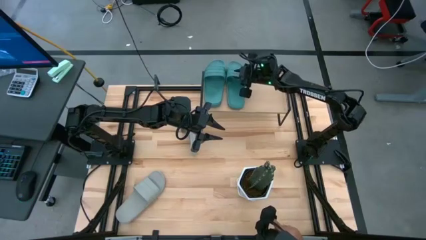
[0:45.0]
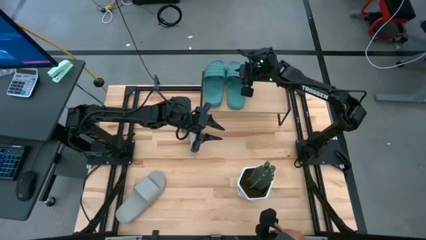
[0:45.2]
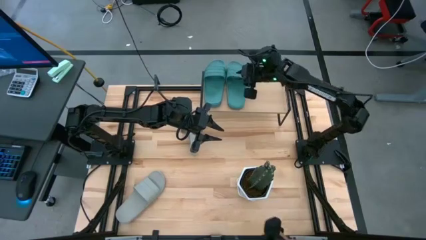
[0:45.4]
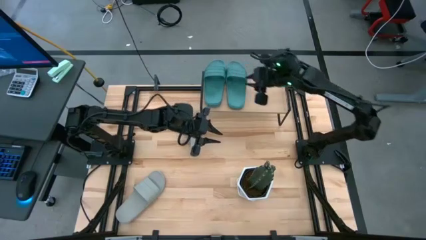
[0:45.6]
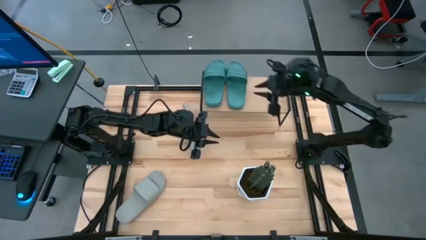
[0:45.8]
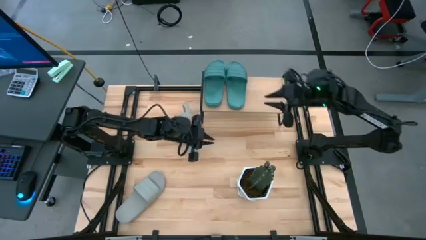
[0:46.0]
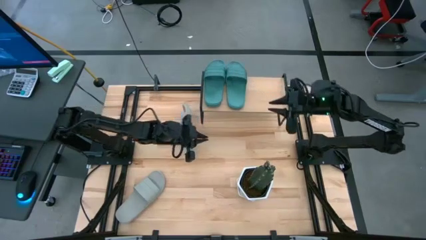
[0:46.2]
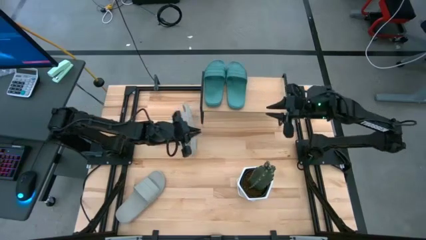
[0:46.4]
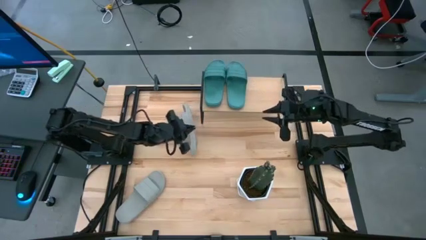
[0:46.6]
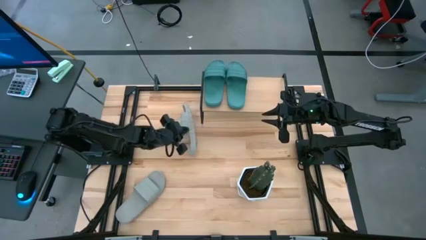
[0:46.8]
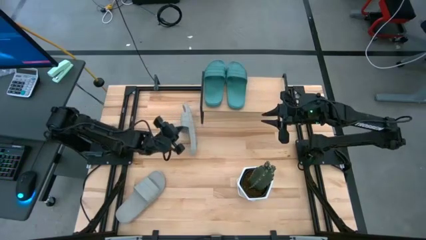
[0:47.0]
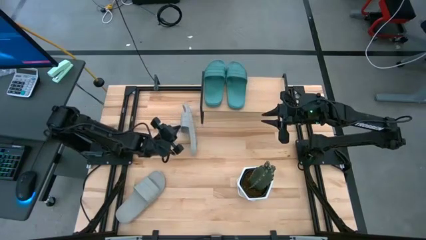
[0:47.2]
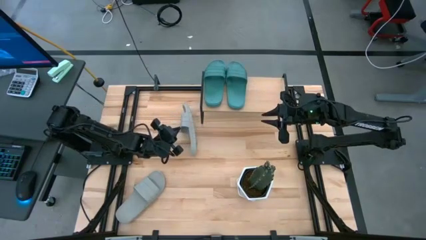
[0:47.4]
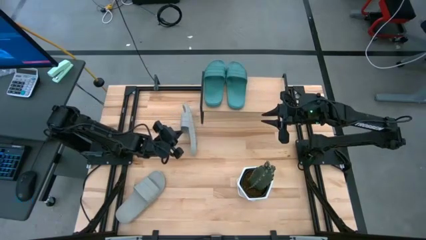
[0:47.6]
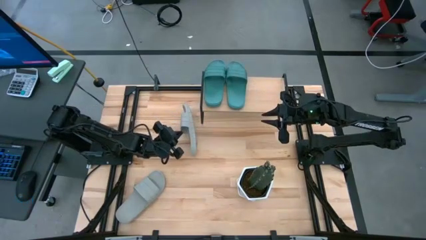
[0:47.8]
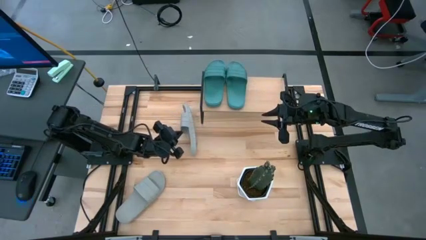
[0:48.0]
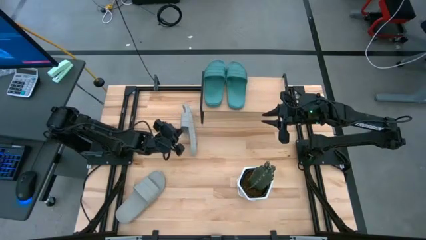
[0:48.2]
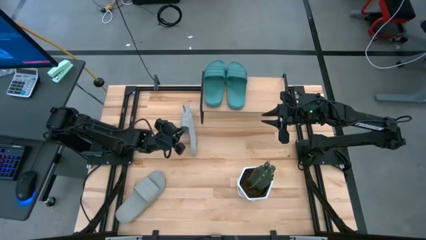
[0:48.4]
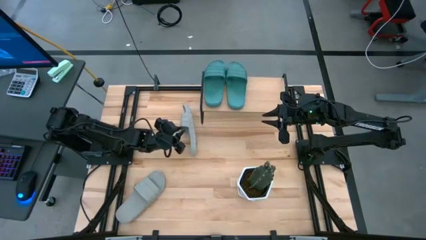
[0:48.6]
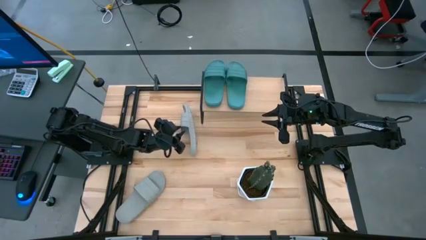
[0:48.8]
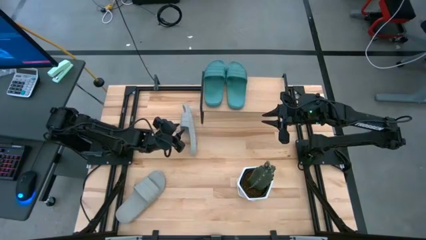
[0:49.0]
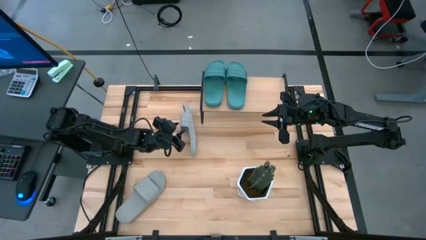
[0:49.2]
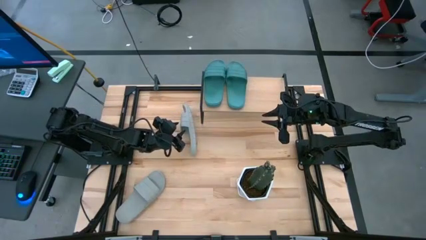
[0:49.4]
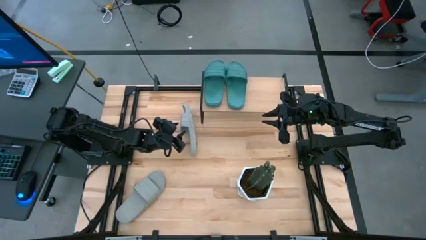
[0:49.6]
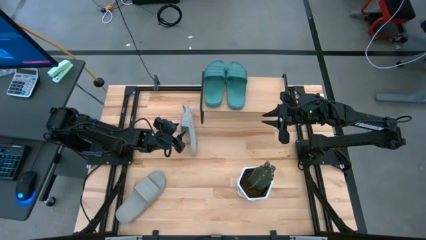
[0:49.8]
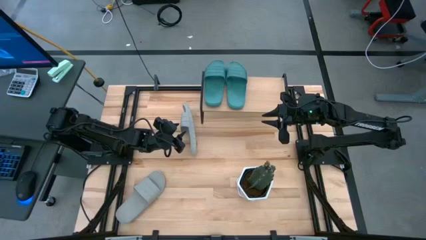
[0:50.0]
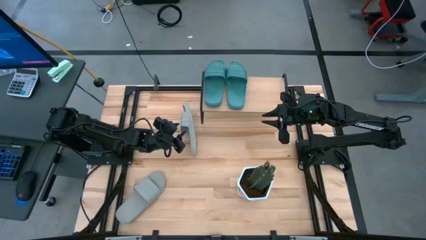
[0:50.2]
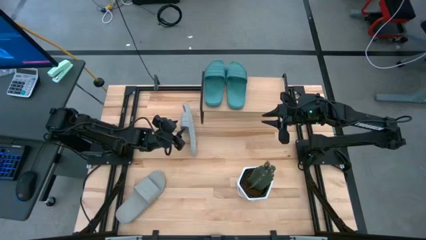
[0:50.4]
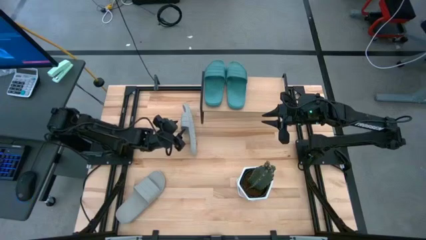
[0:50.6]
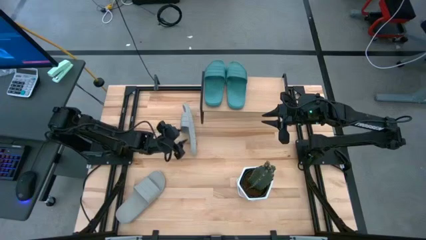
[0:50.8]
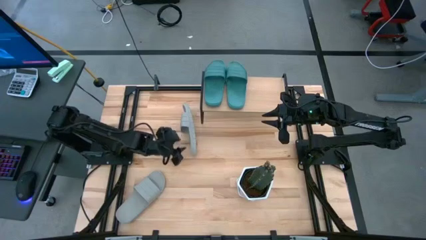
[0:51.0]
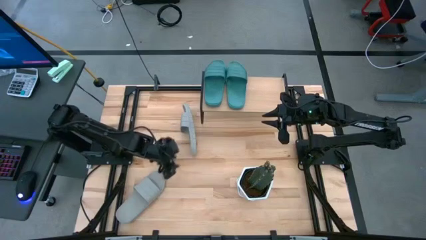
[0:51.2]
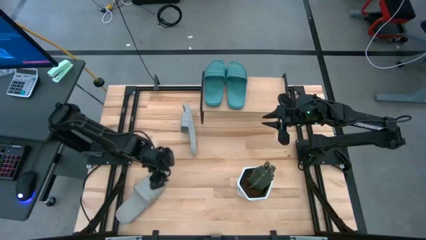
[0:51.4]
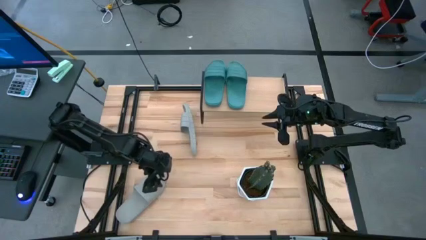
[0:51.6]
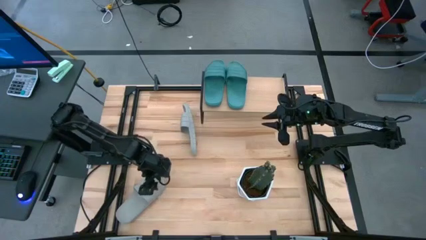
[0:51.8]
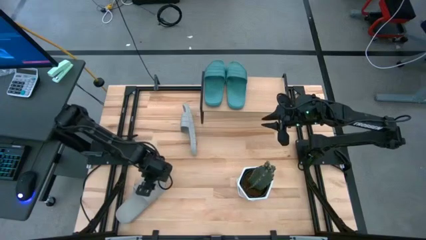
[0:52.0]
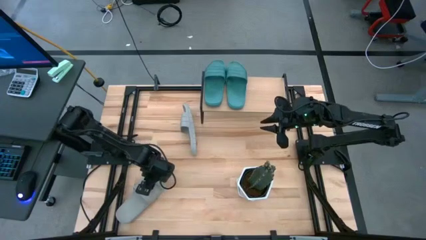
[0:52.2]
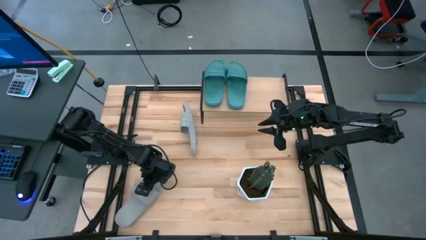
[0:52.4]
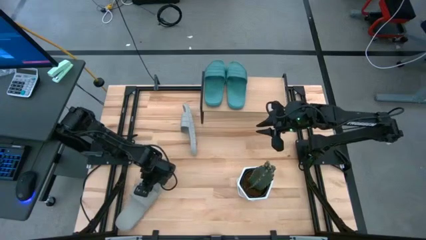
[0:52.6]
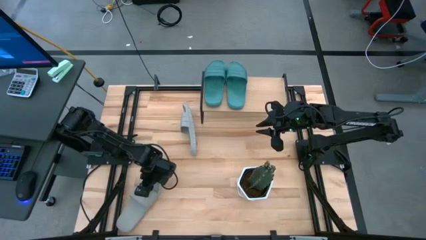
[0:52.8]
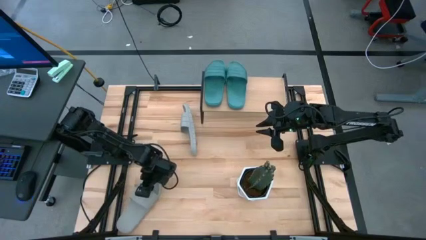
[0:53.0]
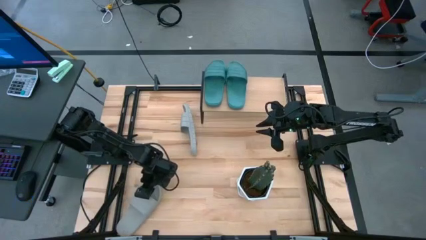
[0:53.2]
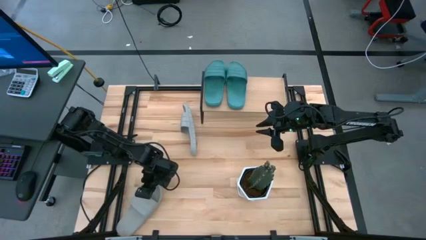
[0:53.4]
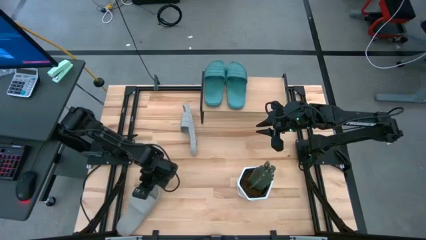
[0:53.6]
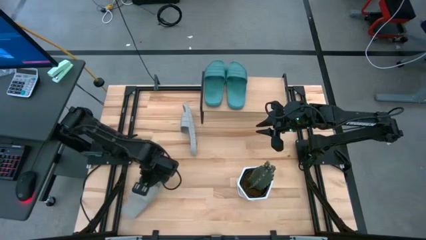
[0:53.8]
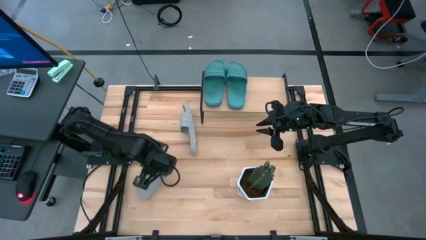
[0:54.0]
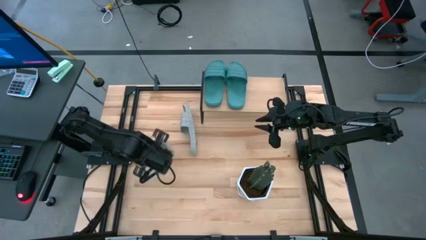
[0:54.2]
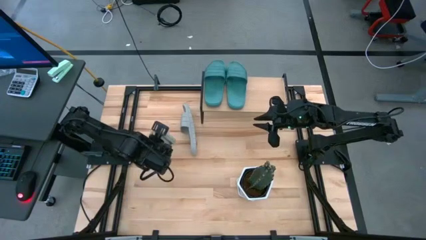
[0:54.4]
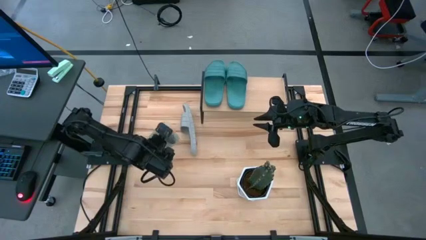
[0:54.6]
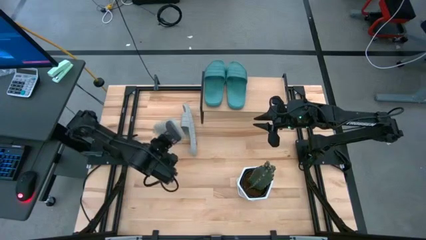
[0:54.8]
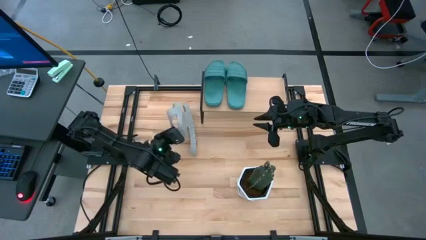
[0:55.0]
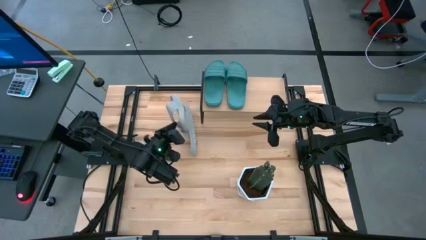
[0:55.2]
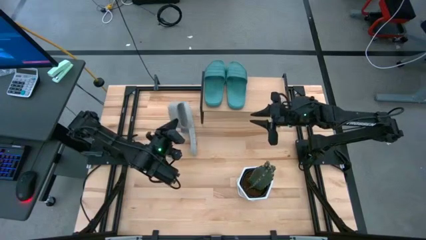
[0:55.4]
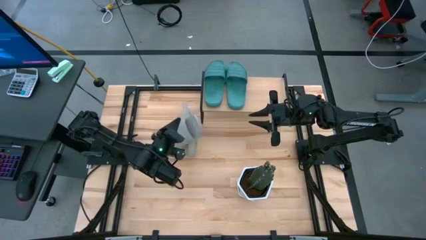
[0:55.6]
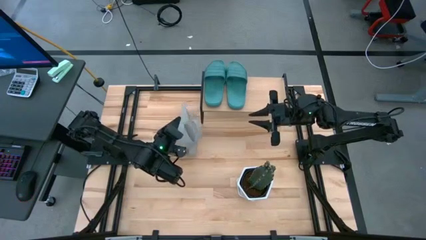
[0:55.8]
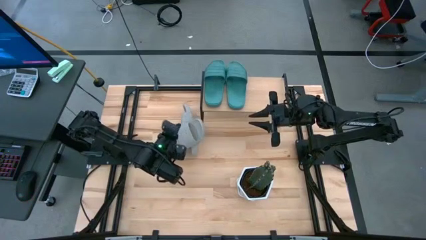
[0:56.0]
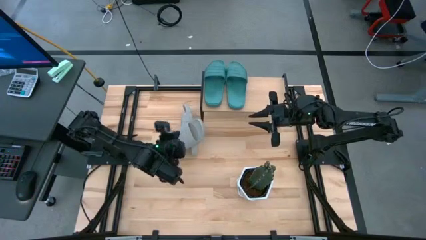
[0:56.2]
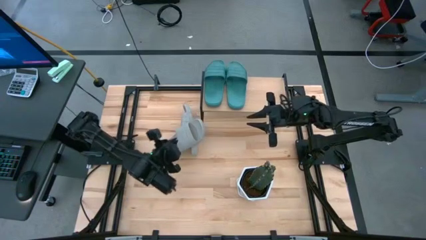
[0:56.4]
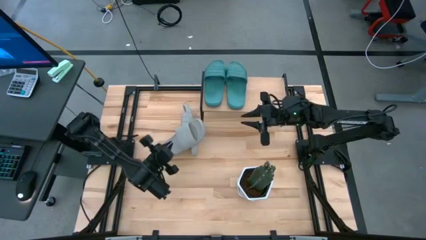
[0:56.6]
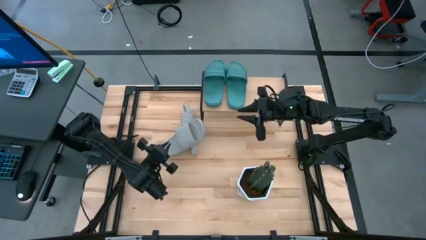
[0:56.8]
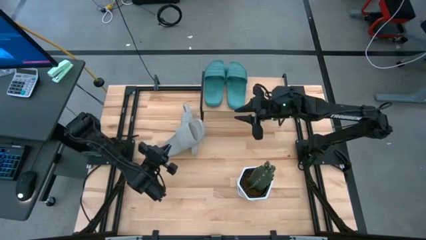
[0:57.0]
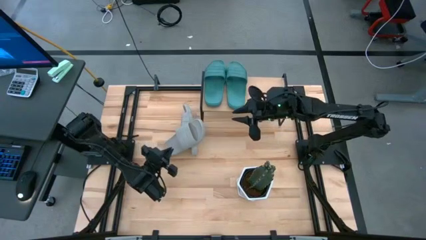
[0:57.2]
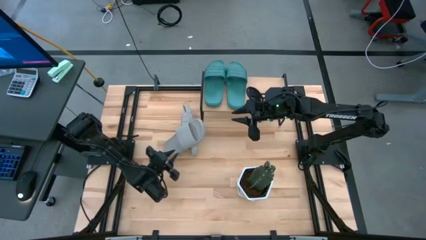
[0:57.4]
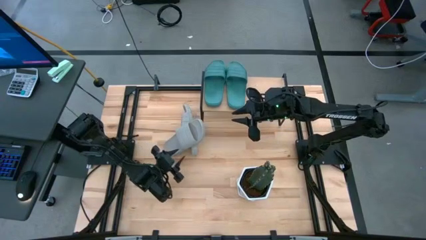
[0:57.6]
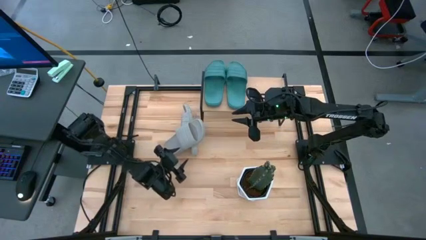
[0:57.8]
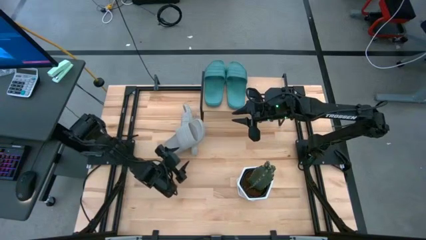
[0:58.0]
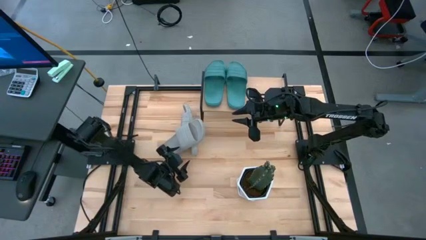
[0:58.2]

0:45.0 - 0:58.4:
Task: Pick and place slides into the shelf
Put the bottom gray slides on the shelf

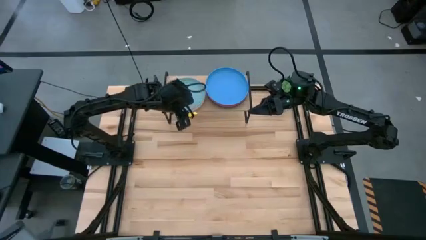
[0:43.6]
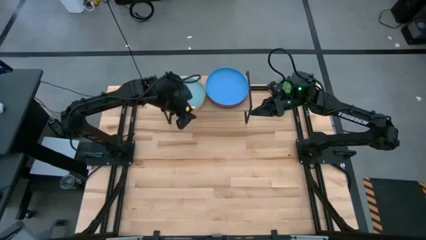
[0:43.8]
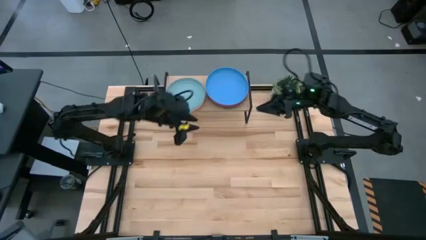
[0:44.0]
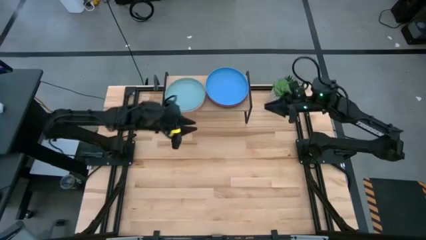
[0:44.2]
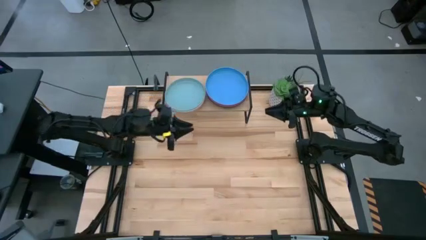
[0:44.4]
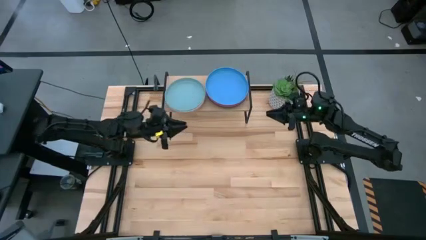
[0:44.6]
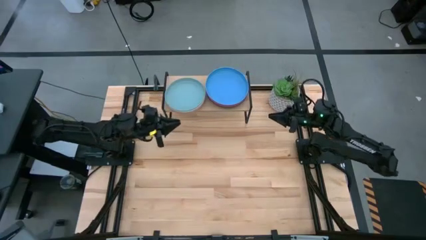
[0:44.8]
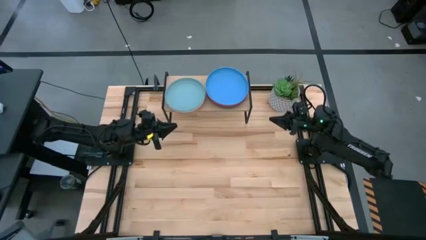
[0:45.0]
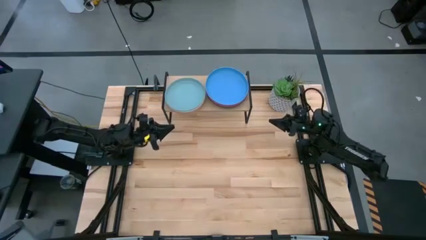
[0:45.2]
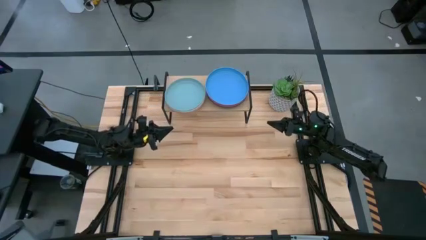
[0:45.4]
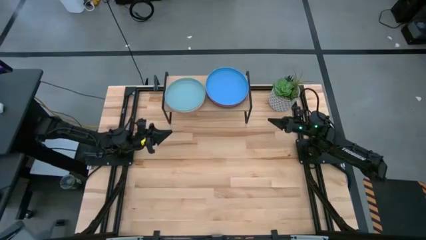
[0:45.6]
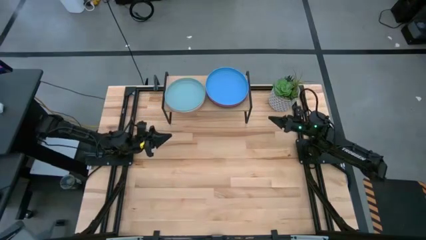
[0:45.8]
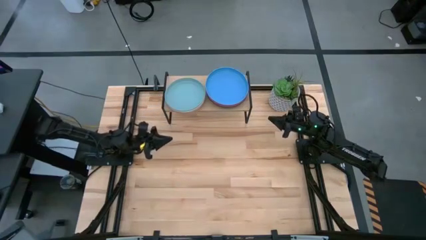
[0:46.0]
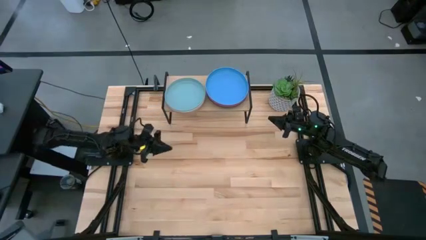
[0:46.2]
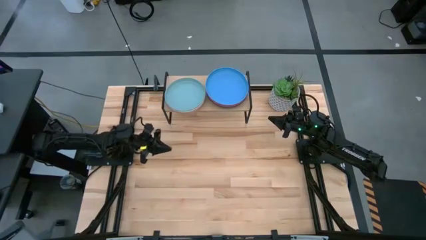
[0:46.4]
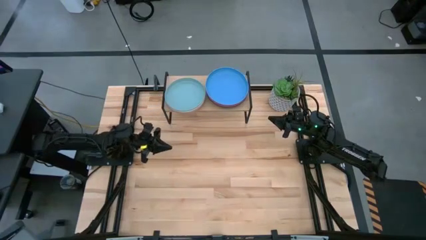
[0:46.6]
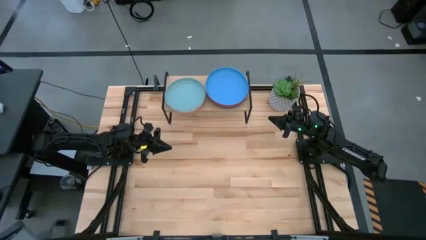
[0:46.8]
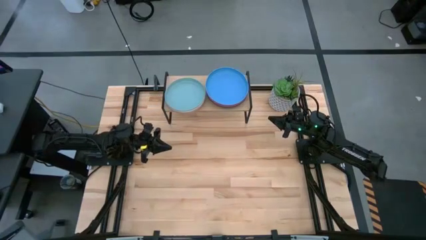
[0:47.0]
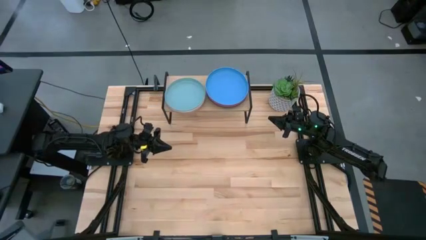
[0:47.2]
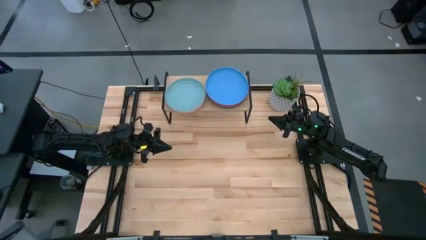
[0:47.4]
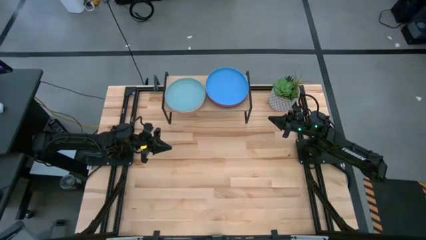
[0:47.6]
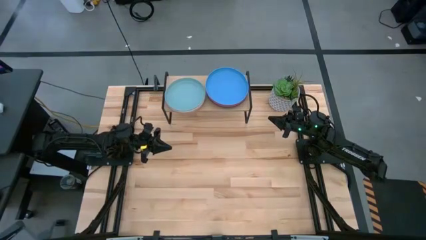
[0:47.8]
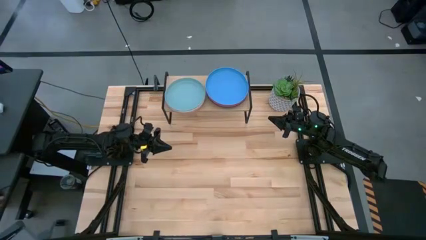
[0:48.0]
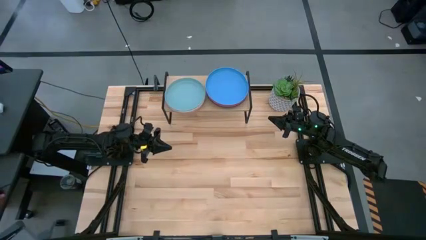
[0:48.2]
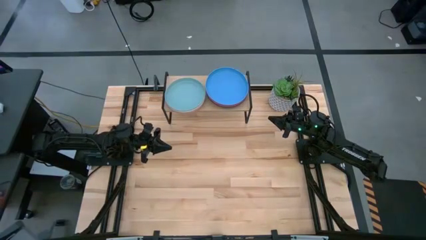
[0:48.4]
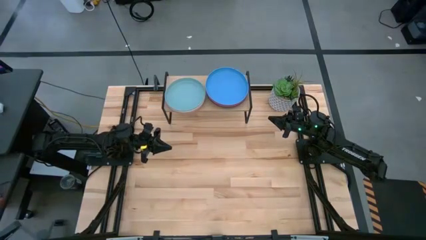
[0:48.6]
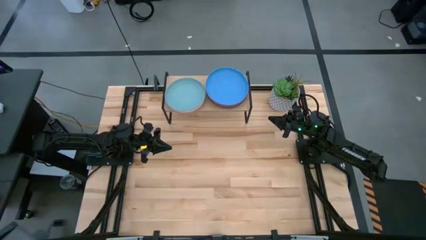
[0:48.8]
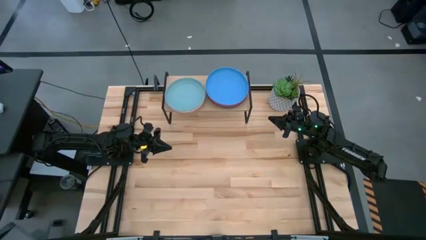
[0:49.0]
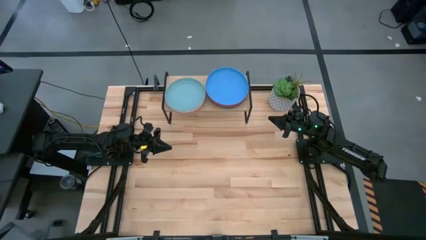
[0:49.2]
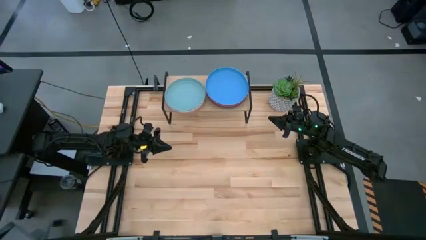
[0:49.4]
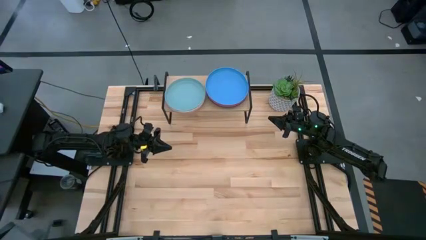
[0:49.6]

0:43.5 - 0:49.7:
Task: Place and stack plates onto a shelf
Return to Home Position
